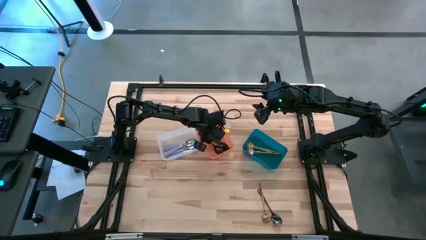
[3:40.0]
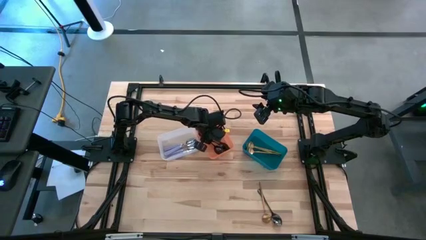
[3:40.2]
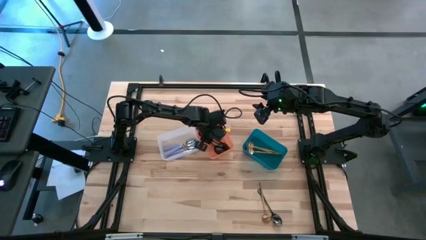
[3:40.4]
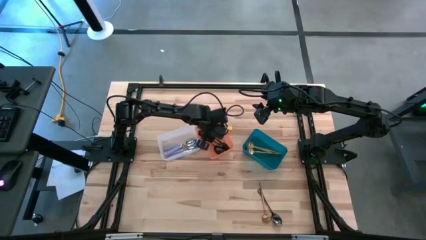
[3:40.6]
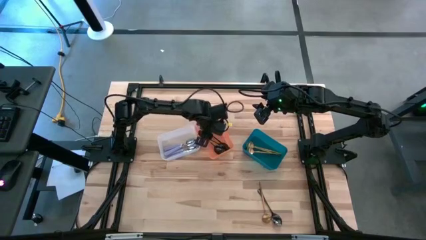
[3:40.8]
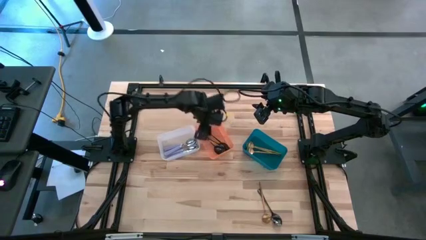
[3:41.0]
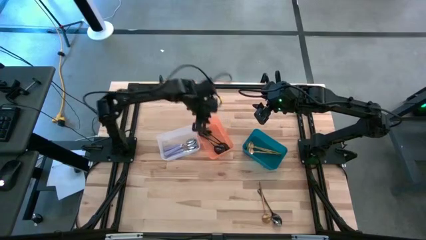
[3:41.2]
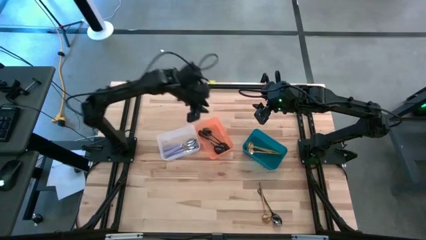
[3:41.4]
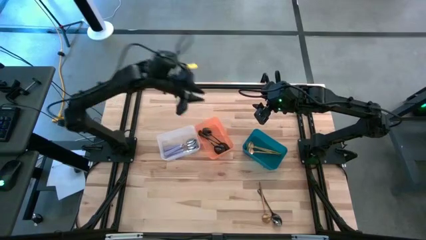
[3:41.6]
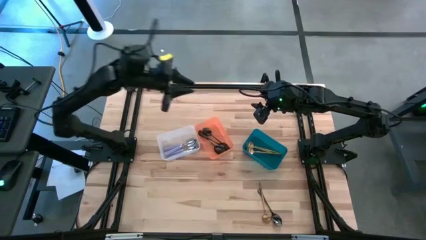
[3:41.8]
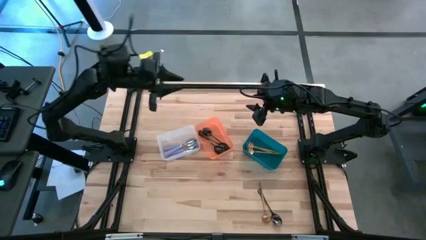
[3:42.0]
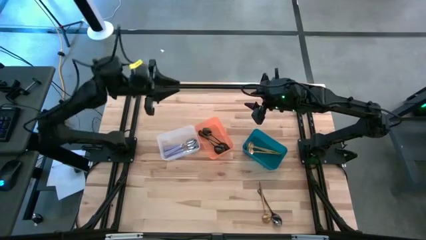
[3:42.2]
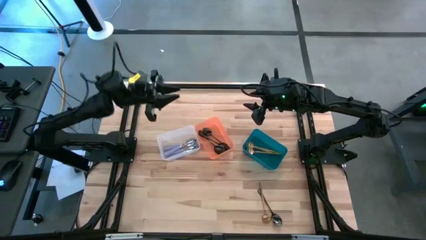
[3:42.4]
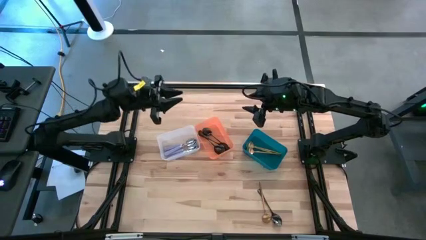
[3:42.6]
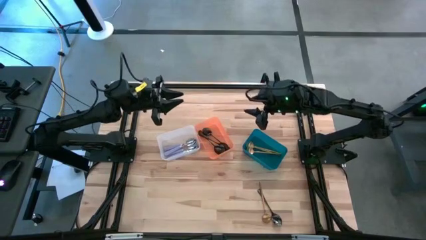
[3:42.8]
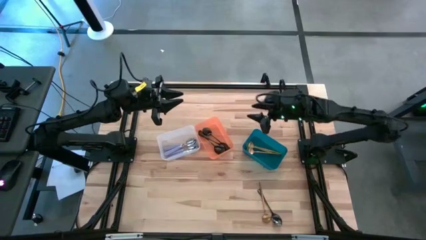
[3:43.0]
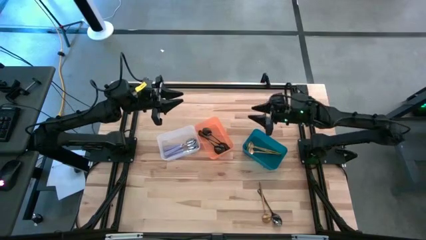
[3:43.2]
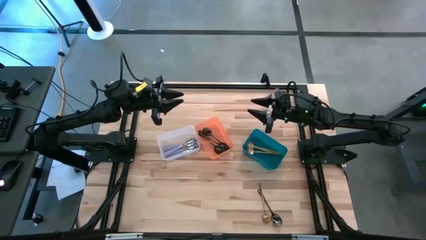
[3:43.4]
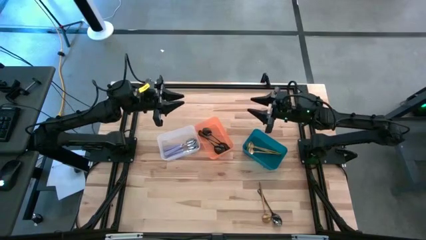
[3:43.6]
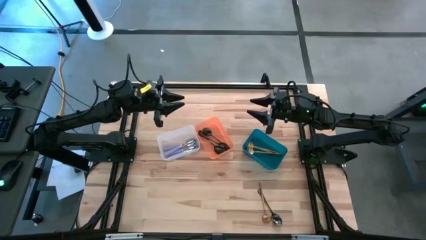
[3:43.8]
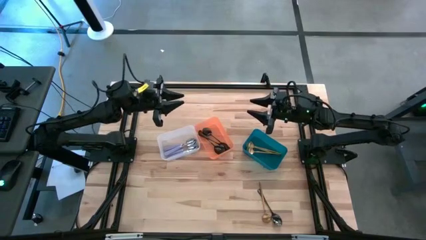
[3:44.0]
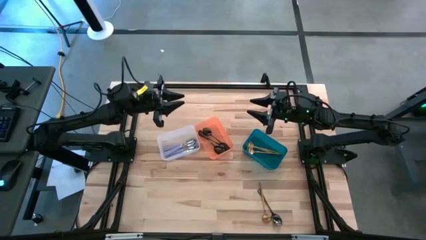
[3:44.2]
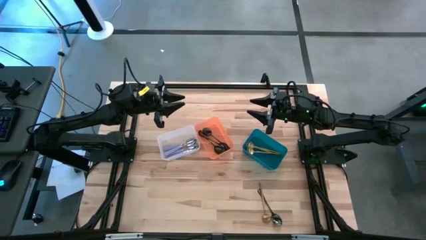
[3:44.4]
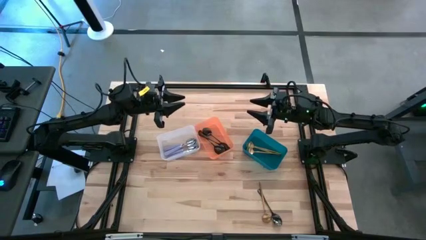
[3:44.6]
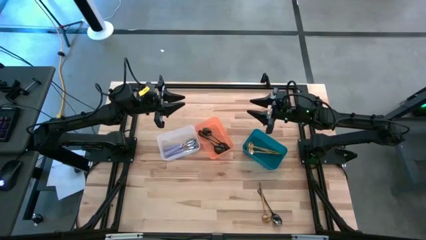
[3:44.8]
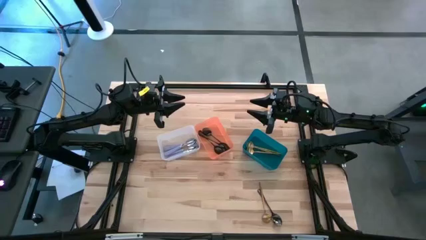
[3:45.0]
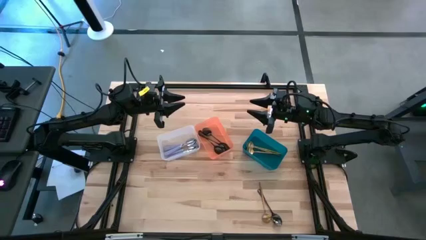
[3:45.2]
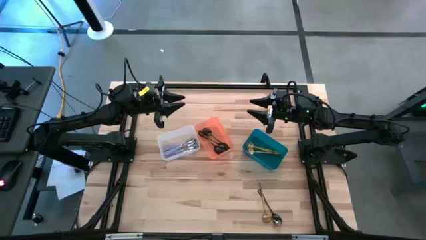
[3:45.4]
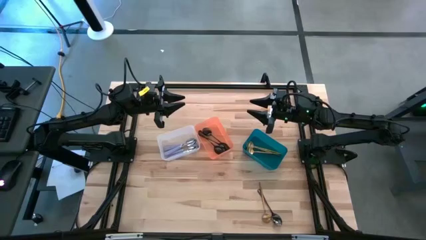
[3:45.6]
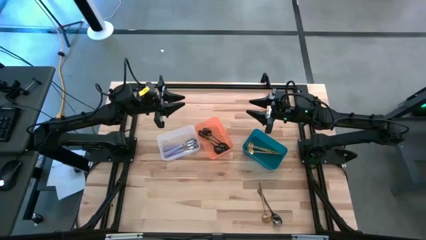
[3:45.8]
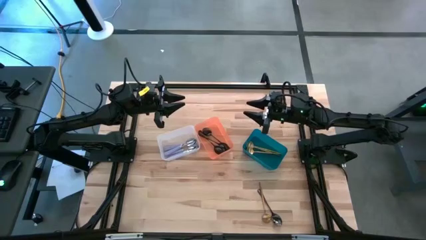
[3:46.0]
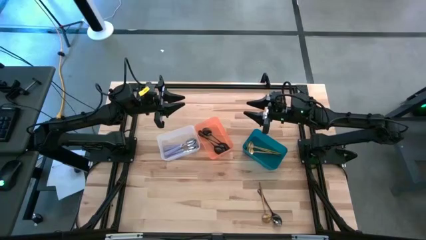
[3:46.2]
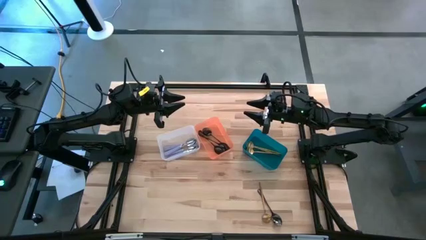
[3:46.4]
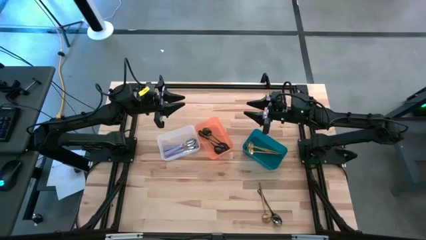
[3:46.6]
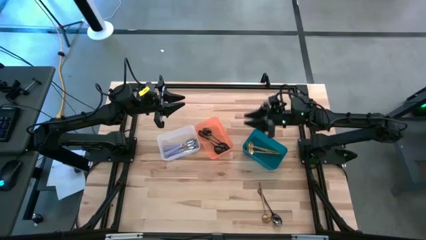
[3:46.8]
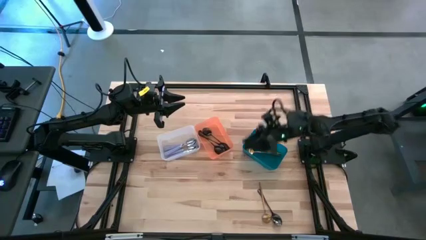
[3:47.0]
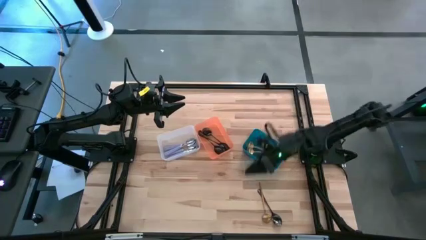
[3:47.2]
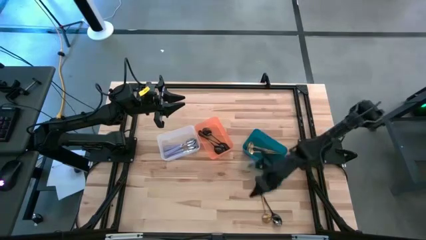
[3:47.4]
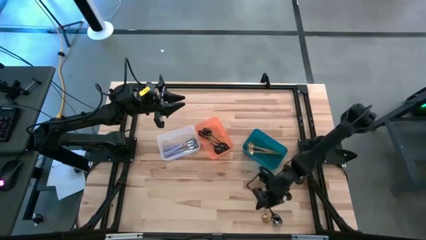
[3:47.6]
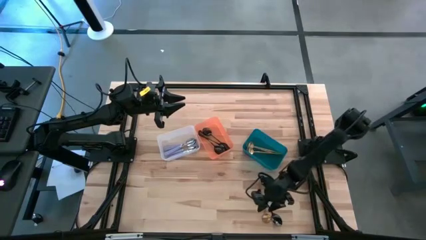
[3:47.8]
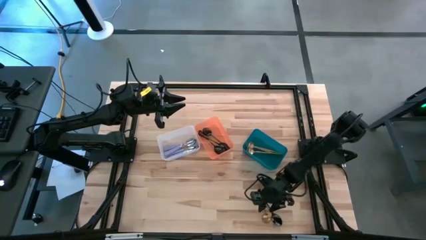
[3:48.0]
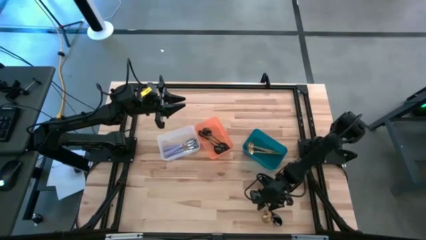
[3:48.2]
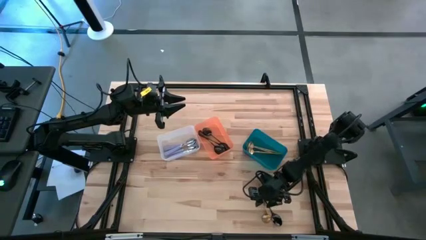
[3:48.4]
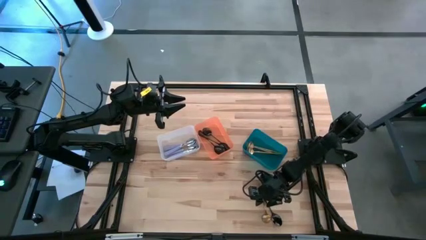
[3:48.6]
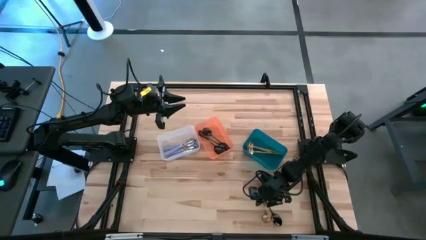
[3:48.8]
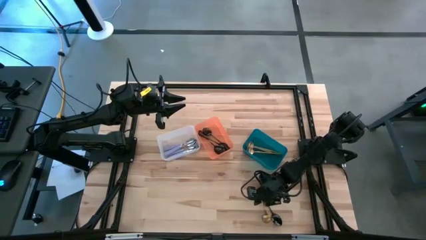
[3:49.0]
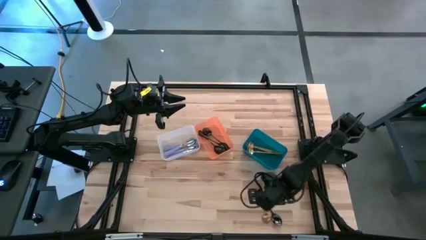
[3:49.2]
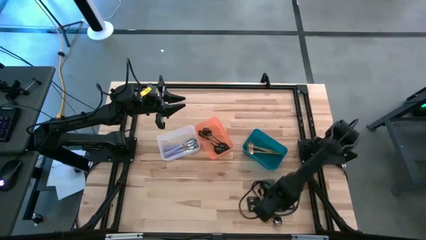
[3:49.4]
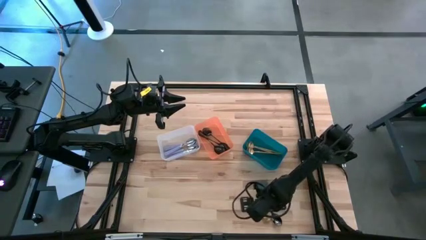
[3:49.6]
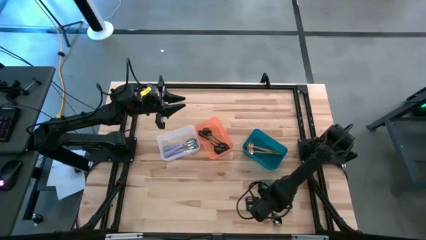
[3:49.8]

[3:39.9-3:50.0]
Task: Sort silverware by color (type)
Put the gold spoon into the blue bin

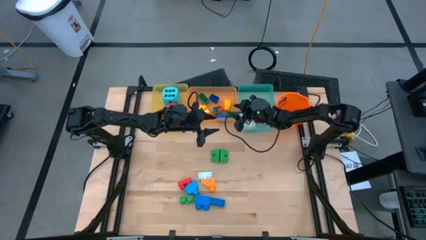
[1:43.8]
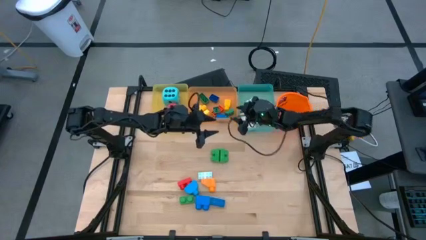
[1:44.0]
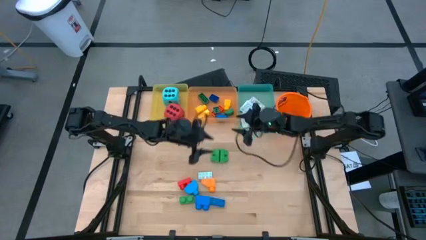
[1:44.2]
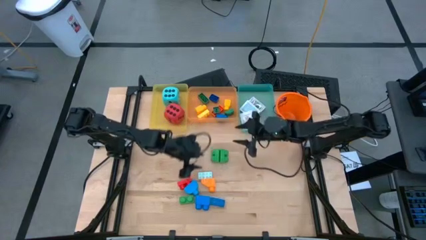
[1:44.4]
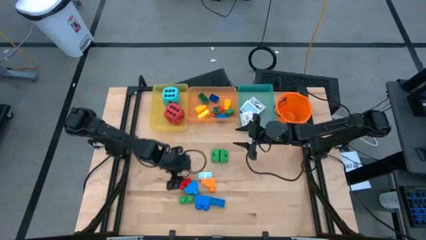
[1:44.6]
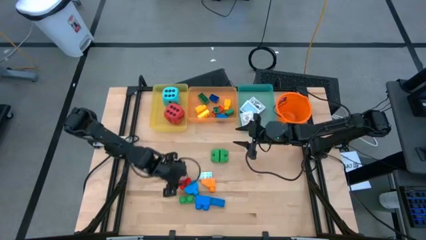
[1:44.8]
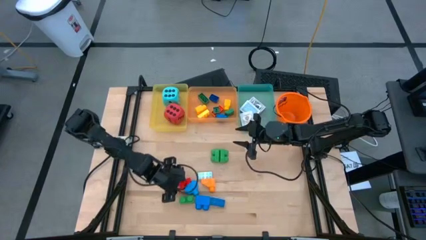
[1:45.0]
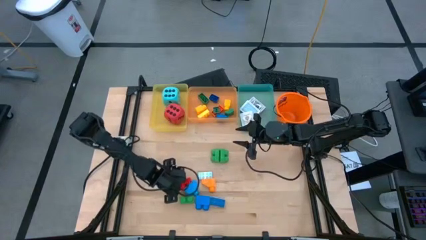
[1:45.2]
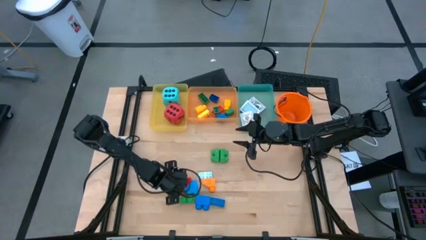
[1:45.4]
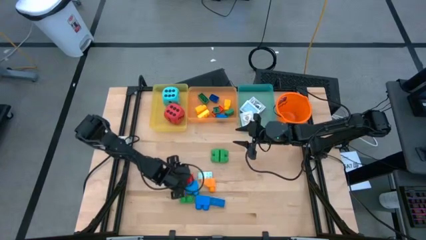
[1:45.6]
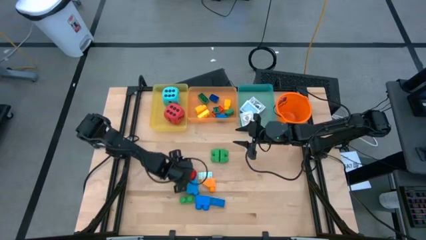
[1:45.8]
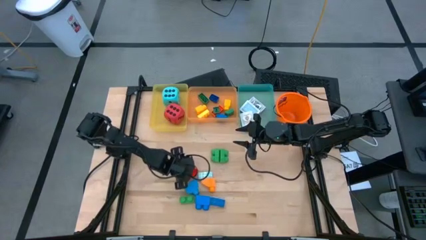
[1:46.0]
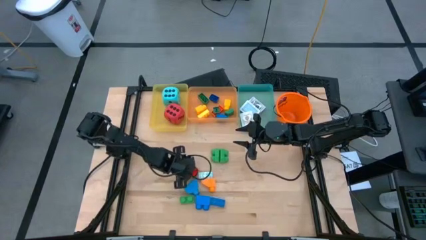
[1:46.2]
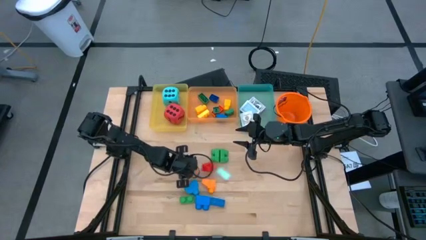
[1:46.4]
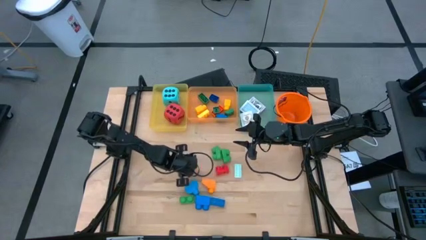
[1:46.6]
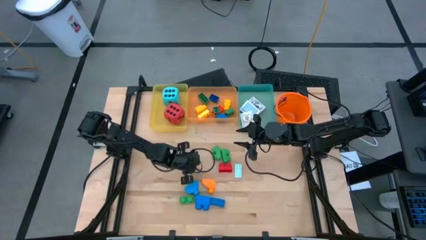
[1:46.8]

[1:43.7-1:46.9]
Task: Pick & Place Toys
Put the red game piece into the orange bin

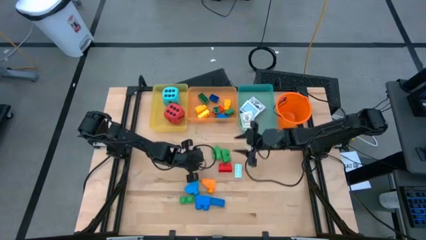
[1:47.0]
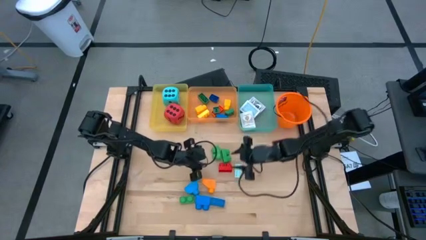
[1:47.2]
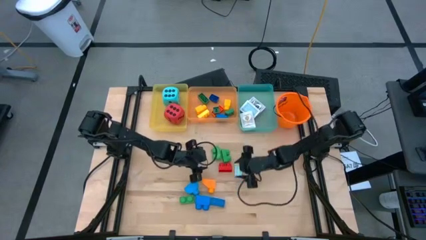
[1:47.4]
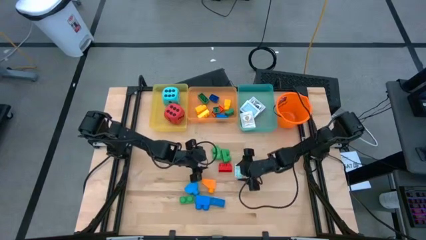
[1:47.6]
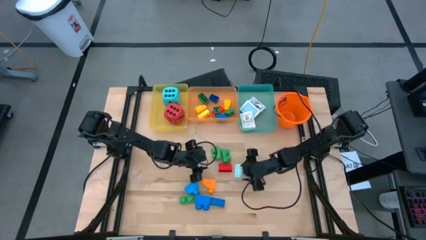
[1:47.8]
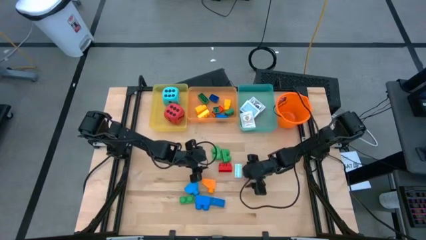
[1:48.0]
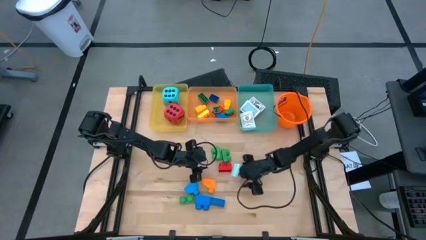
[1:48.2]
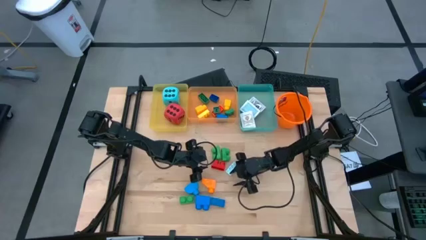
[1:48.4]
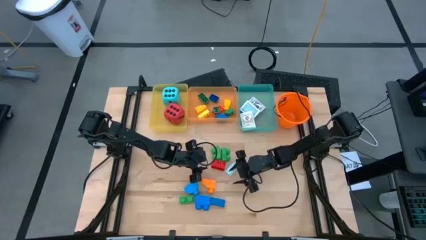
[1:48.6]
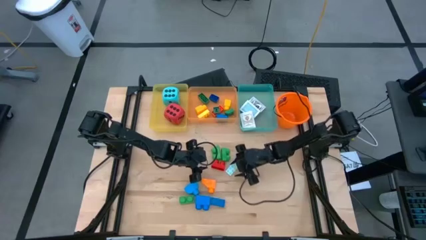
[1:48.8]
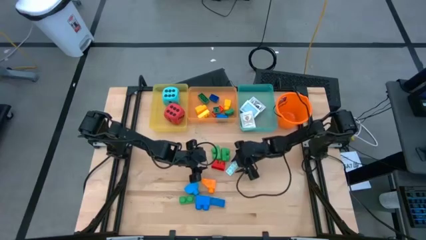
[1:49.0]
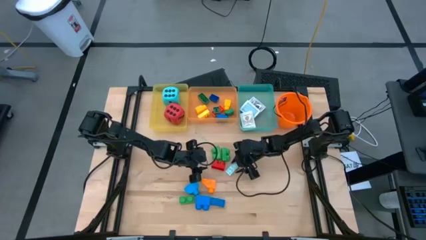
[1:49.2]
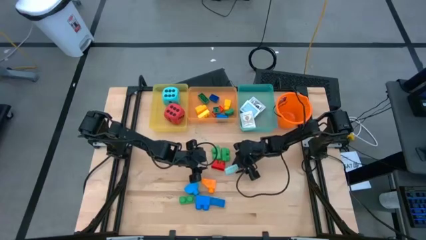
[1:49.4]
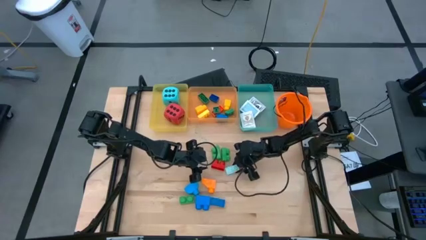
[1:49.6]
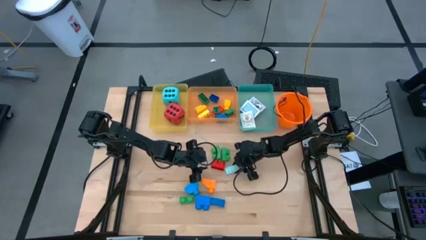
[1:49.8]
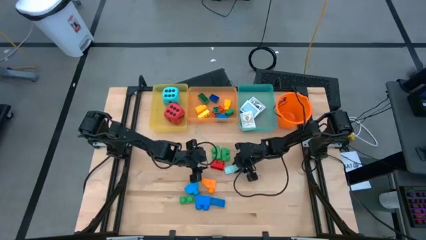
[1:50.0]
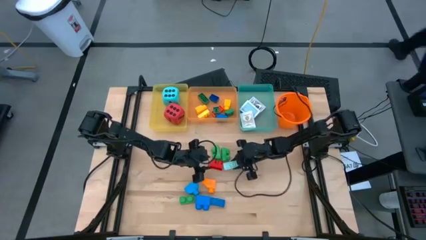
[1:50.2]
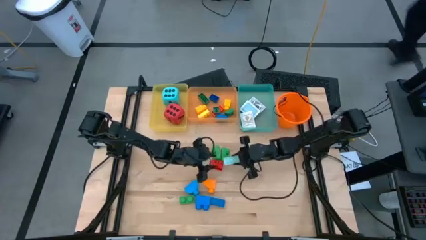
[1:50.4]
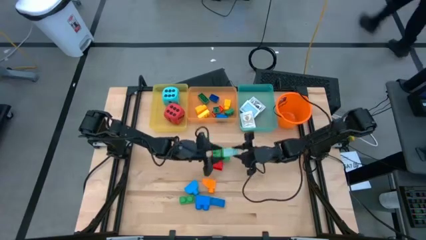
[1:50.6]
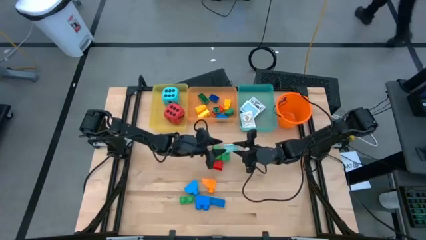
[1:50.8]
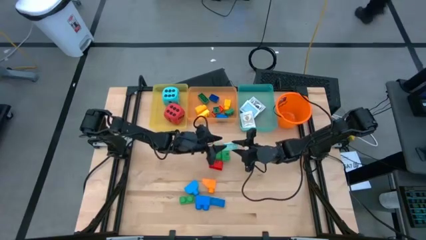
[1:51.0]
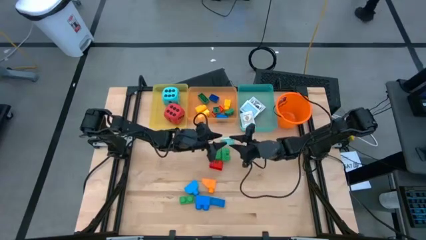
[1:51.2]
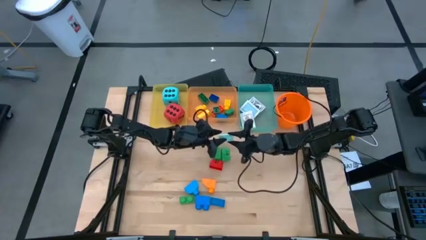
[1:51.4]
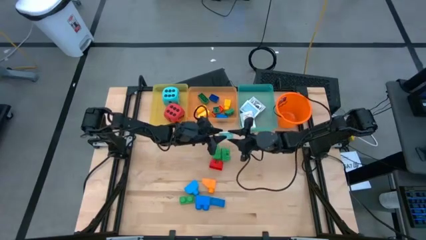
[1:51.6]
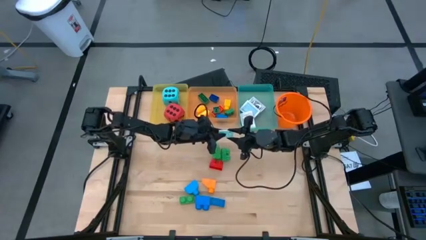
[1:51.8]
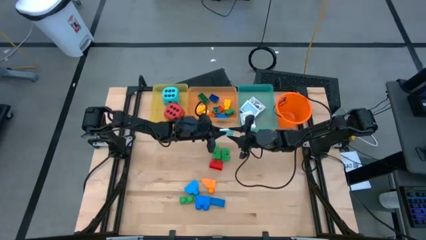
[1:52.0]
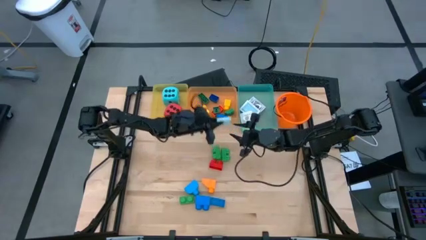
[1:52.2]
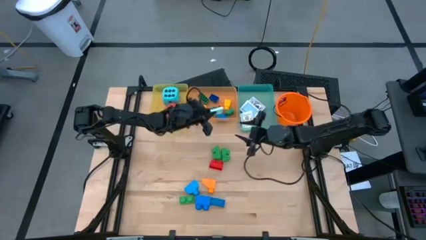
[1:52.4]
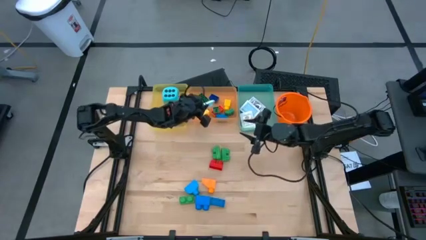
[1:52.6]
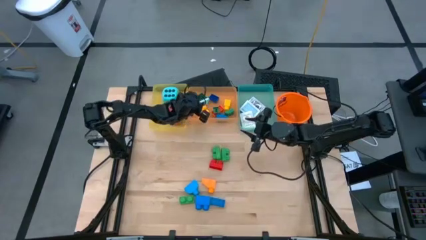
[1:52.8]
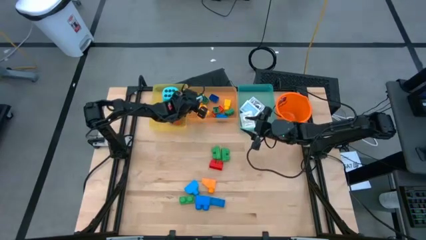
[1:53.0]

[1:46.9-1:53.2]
Put the light blue game piece into the orange bin
